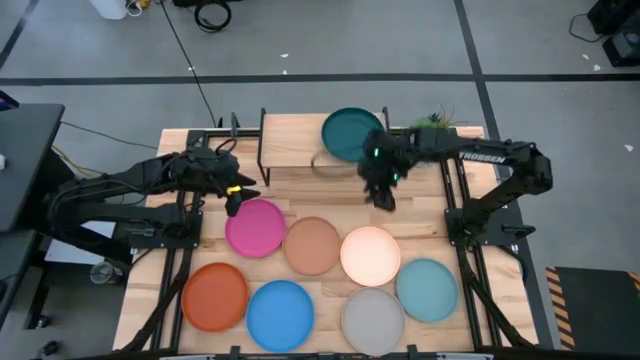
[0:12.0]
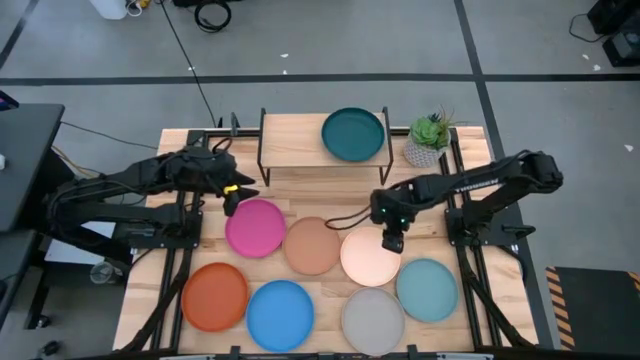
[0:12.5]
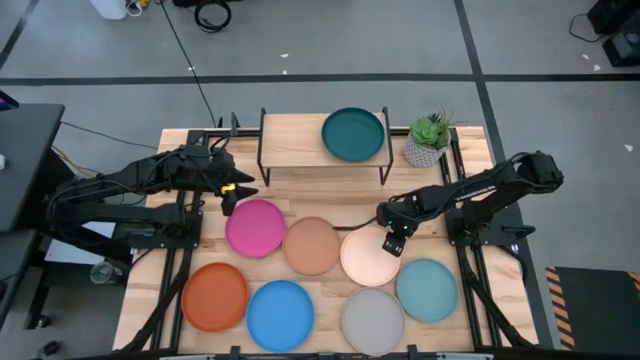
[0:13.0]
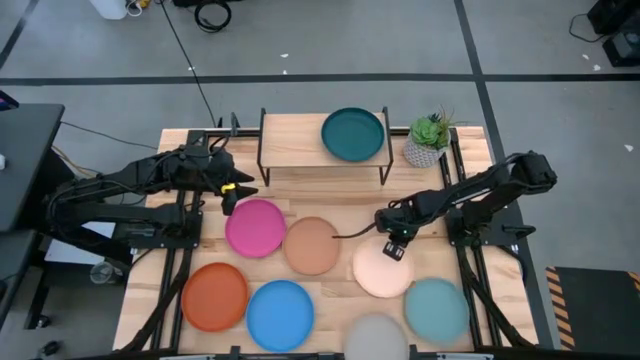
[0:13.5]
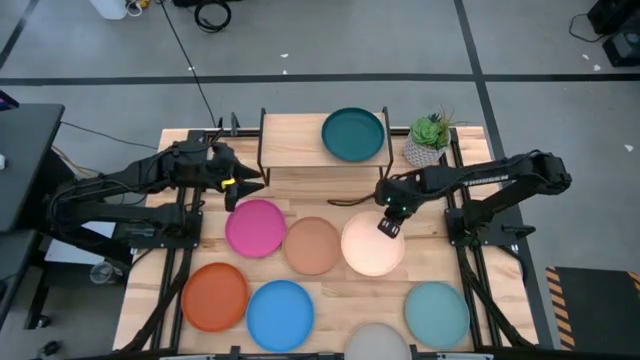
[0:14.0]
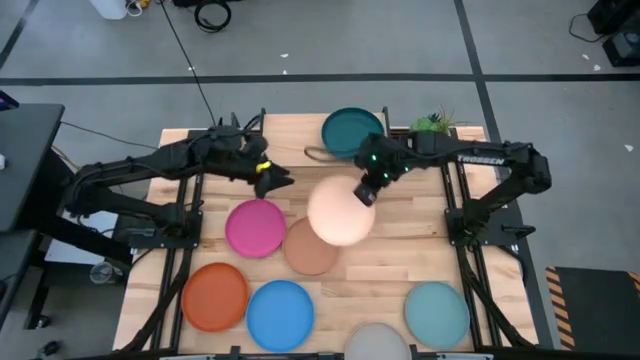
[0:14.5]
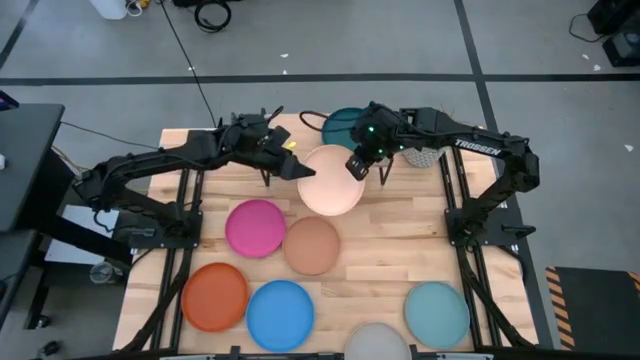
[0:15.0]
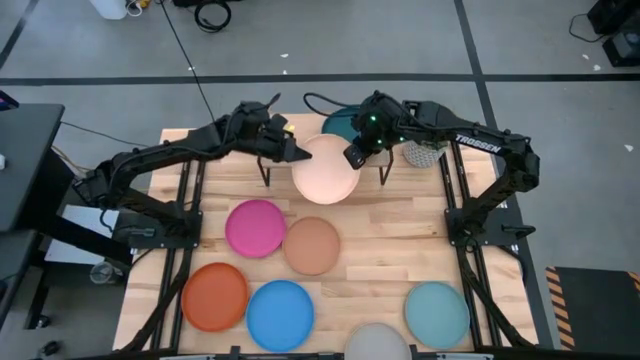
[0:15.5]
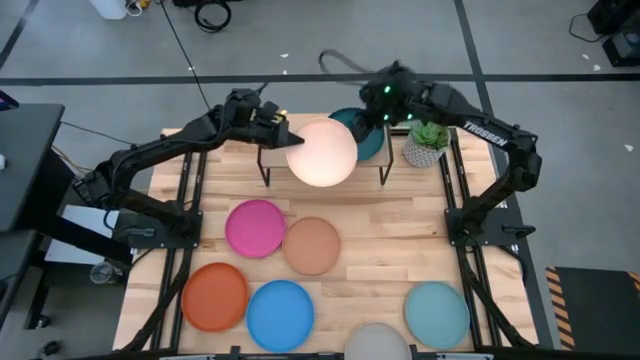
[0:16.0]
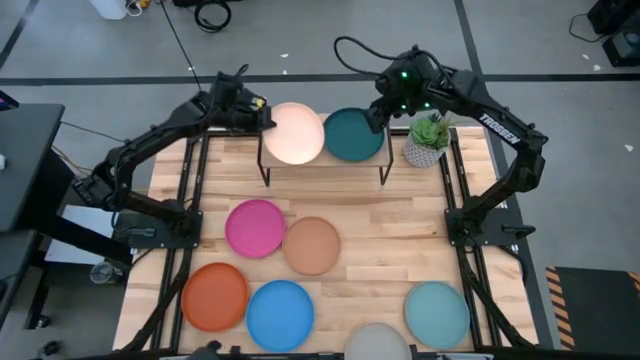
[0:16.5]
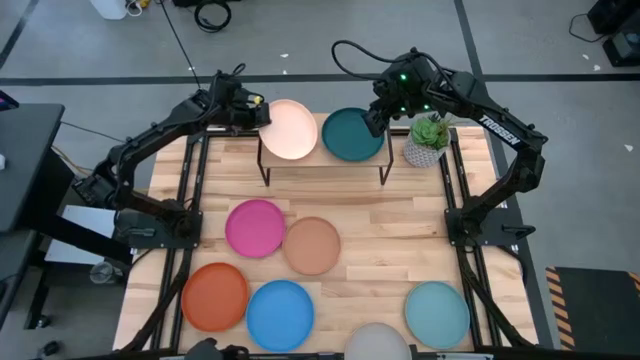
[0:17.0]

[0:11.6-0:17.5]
Task: Place and stack plates onto a shelf
Put the light orange plate on the shelf

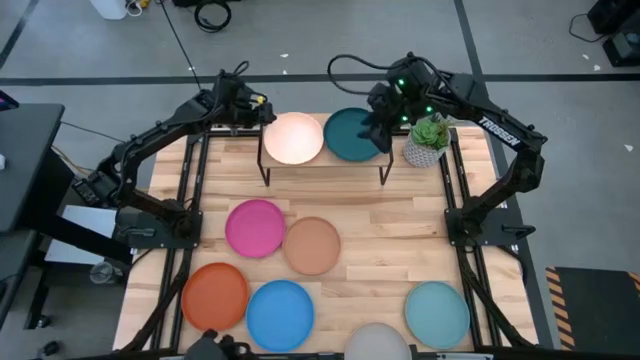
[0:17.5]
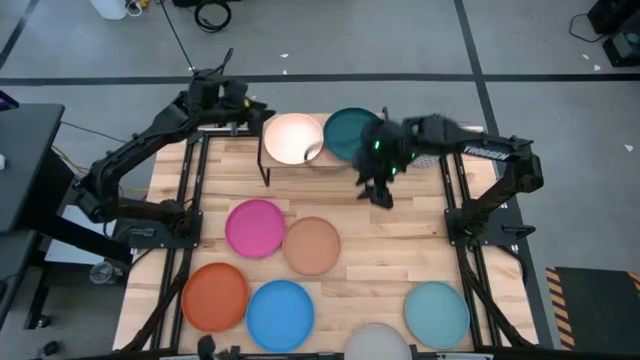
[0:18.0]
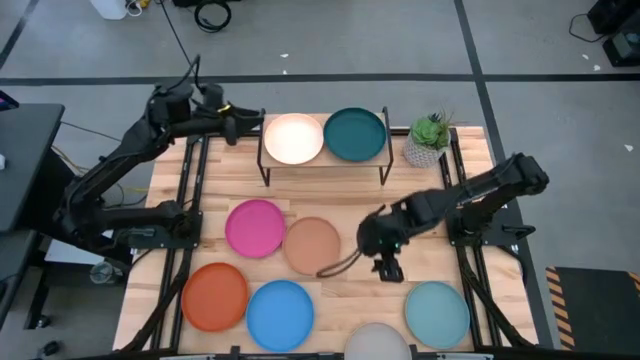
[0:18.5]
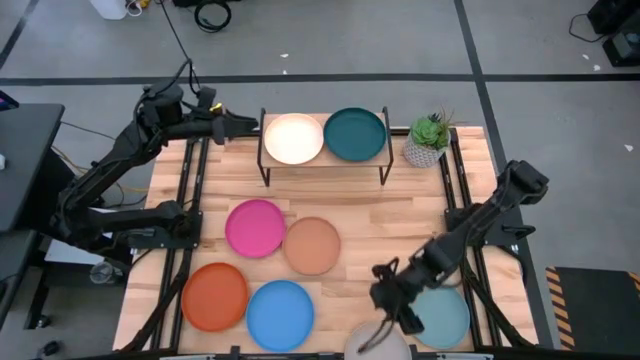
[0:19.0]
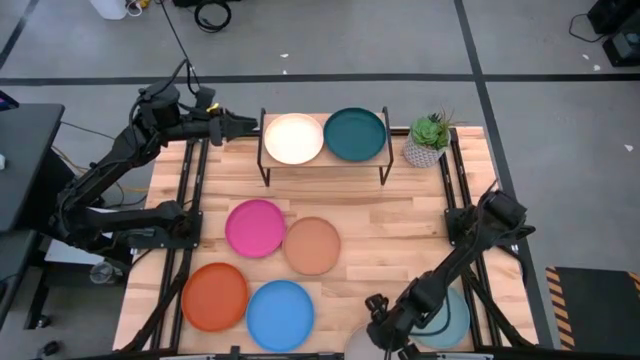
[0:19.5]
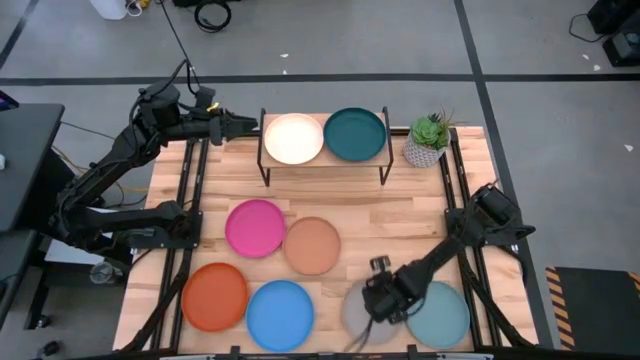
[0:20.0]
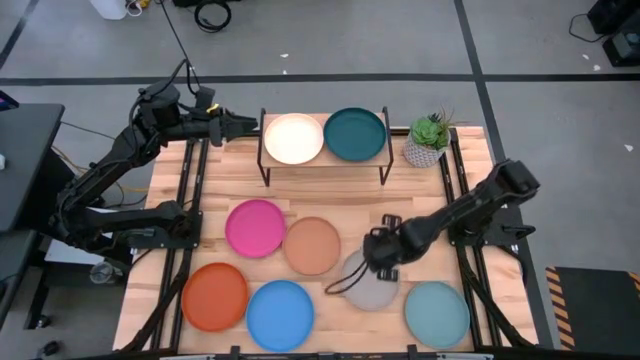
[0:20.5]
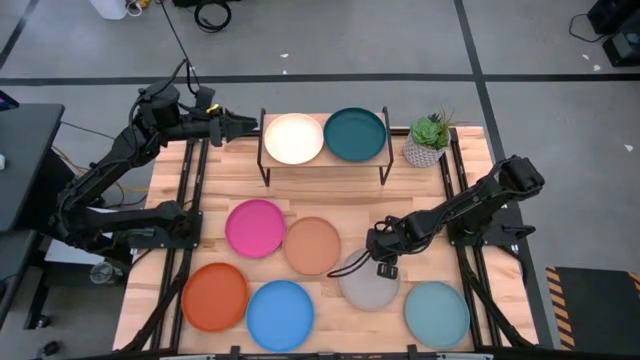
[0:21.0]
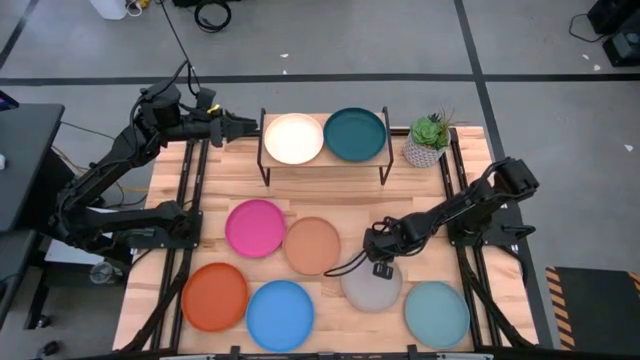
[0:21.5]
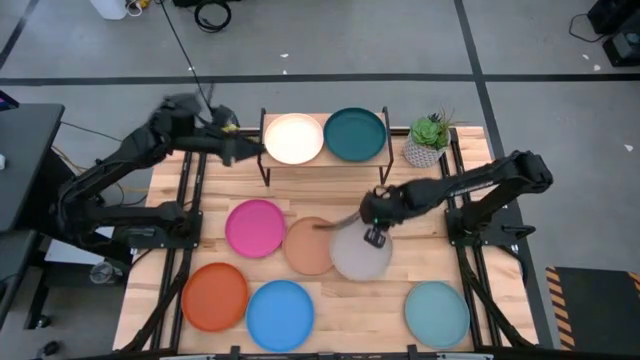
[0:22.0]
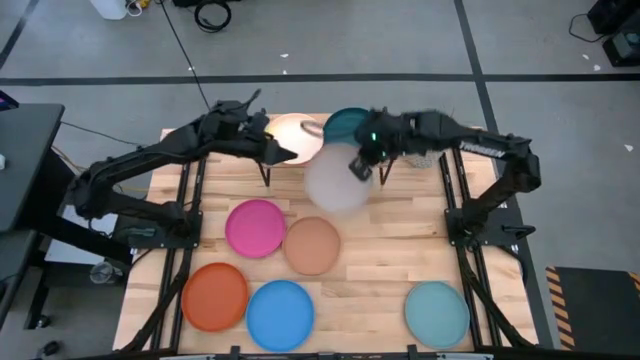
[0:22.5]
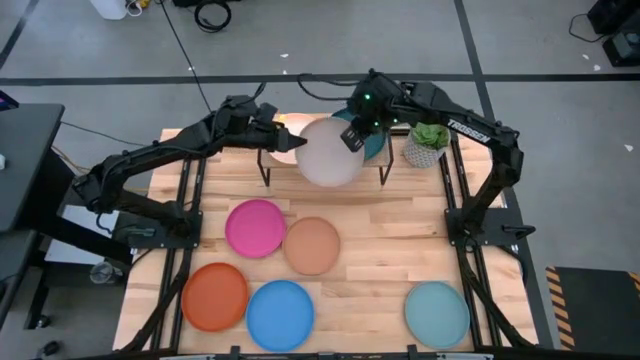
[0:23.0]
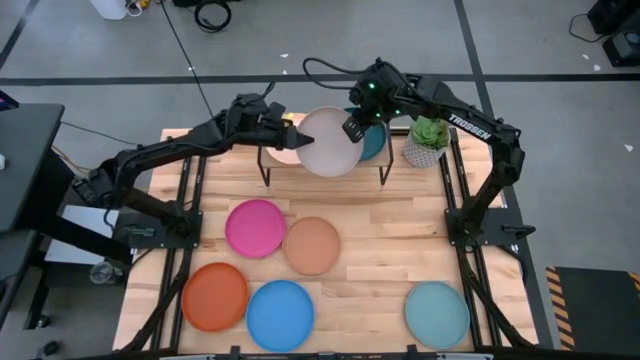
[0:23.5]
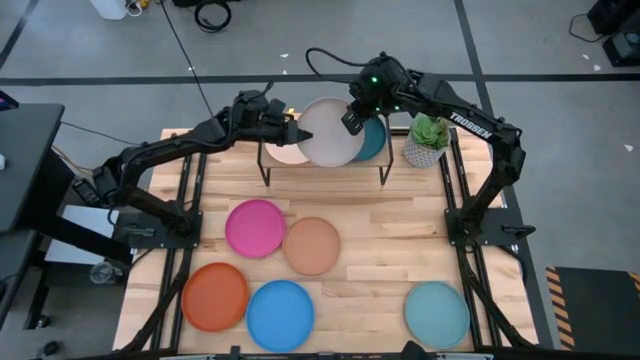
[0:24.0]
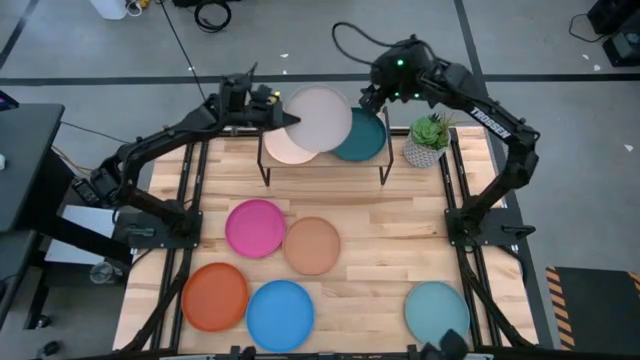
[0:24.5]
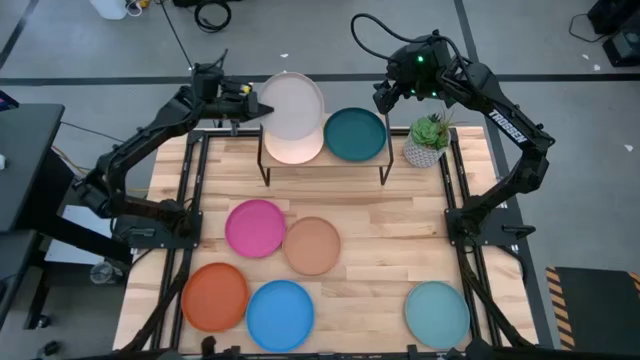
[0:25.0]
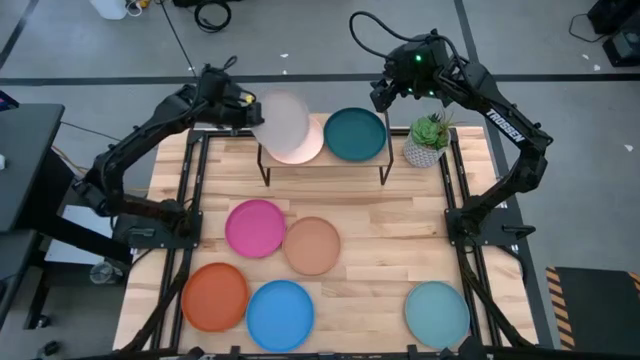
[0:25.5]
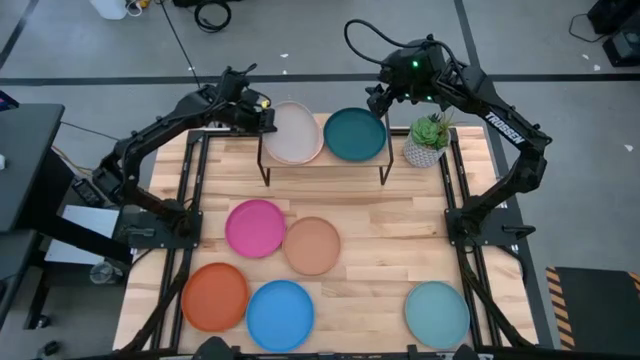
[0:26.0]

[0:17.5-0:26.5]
Stack the gray plate on top of the light orange plate on the shelf

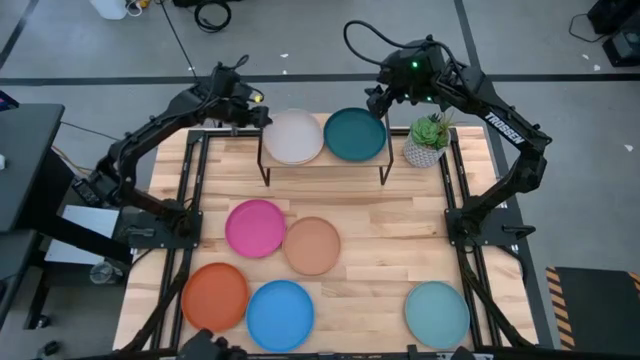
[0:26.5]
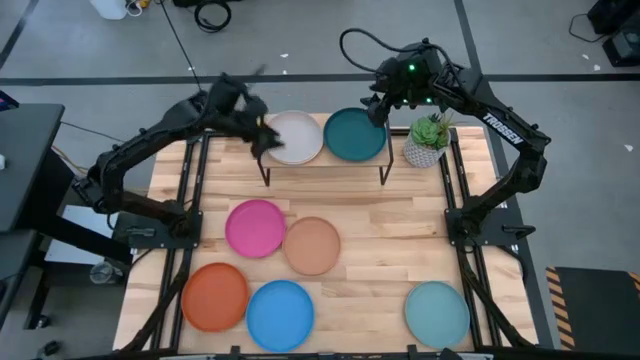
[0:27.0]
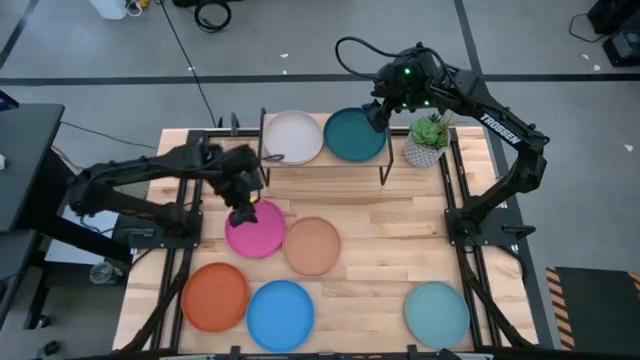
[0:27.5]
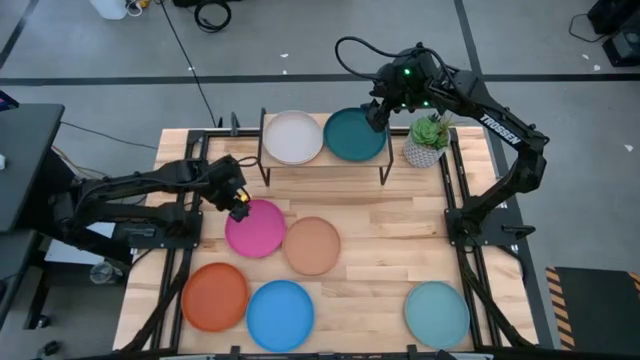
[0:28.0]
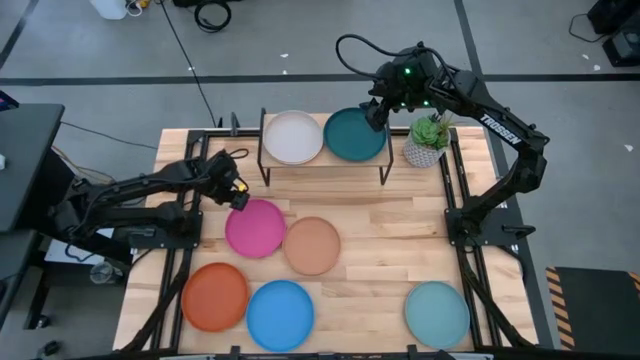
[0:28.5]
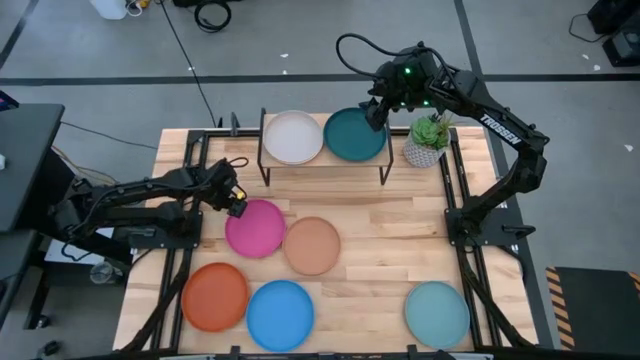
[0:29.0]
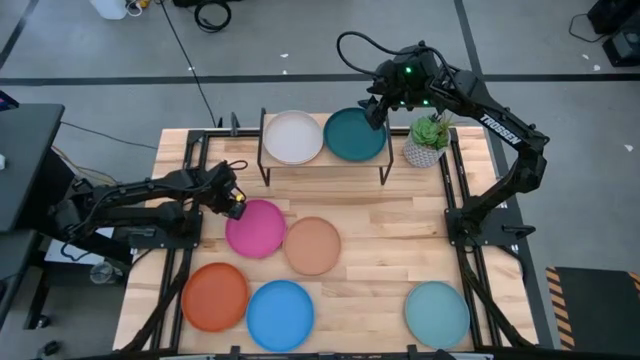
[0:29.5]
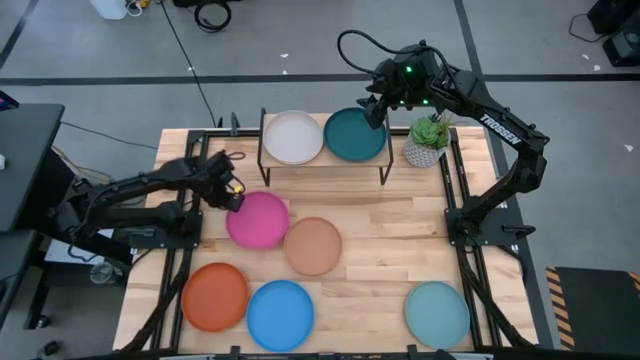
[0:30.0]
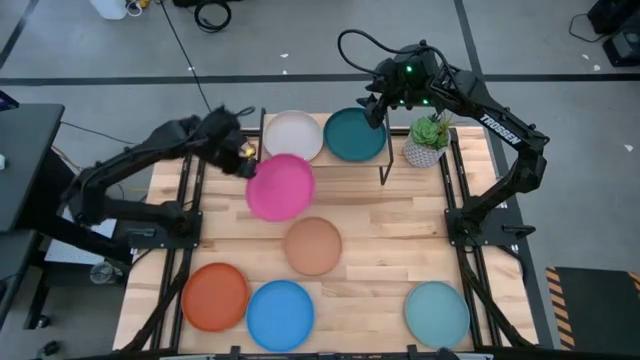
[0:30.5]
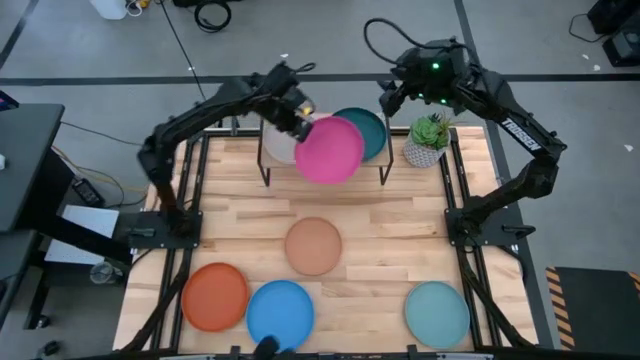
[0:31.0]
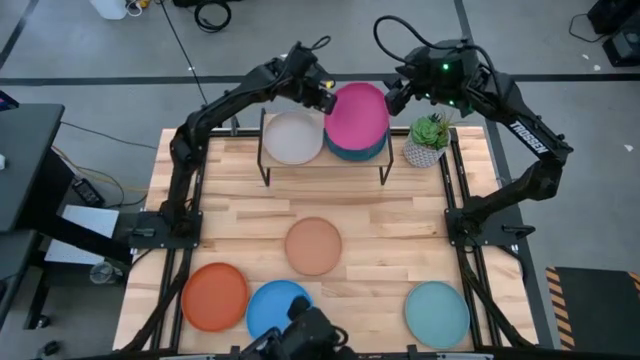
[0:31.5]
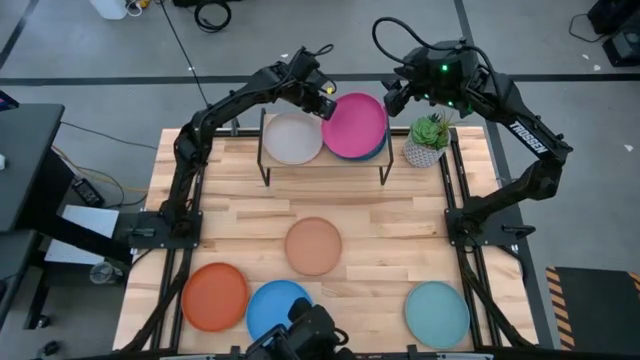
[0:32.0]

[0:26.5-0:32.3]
Stack the pink plate on top of the dark blue plate on the shelf

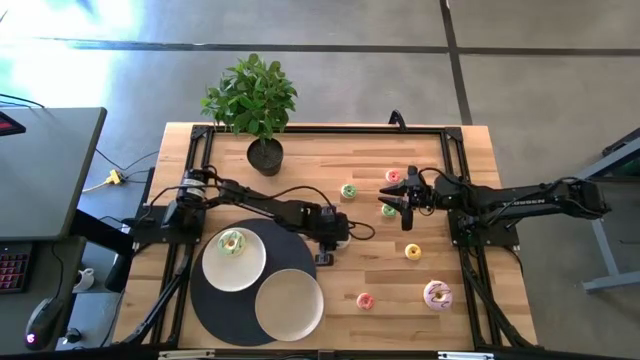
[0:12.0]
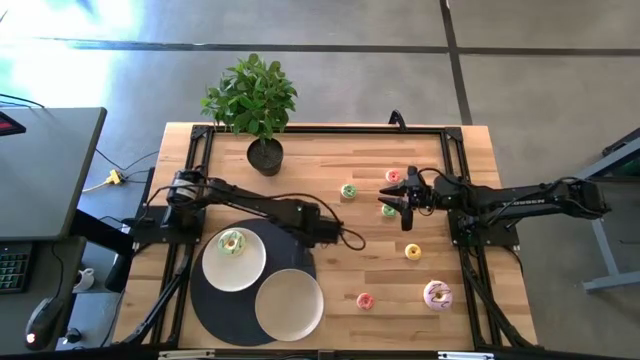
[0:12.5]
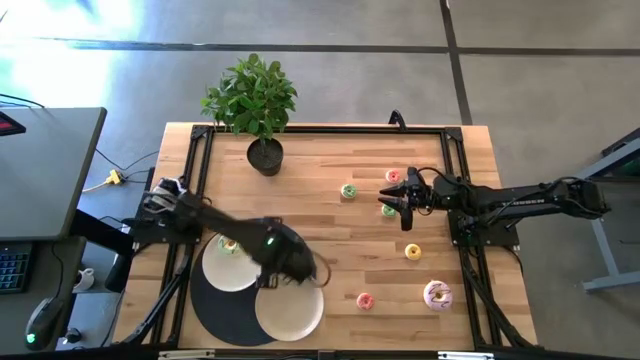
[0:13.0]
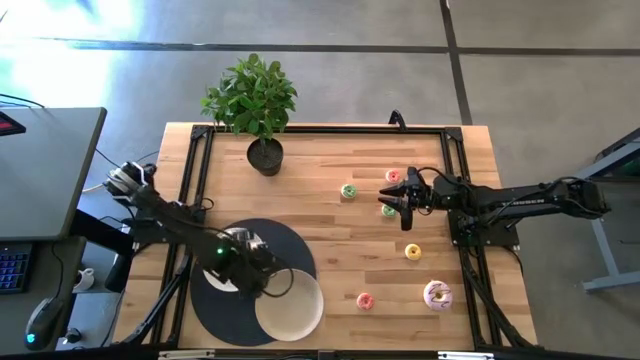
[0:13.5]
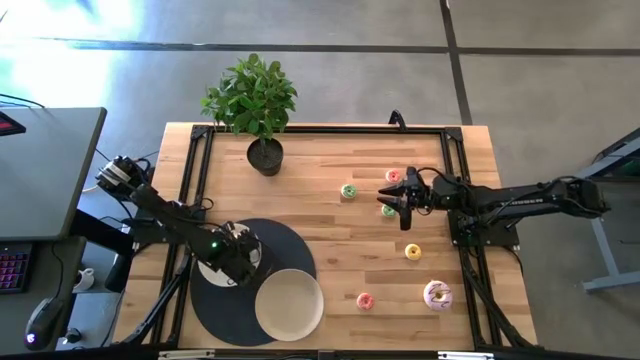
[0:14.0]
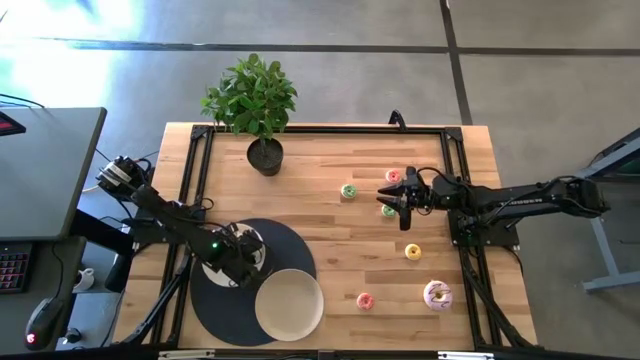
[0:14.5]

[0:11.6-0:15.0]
Task: Pick & Place donuts
Put the large white donut on the white plate
